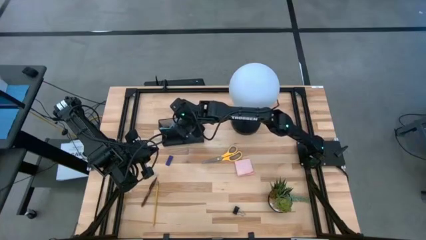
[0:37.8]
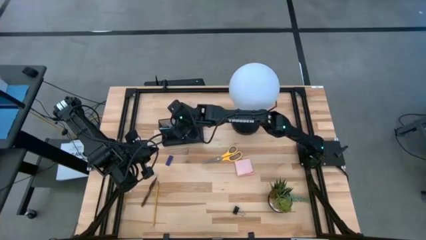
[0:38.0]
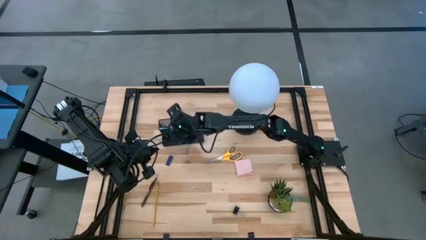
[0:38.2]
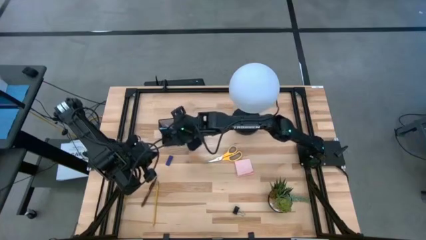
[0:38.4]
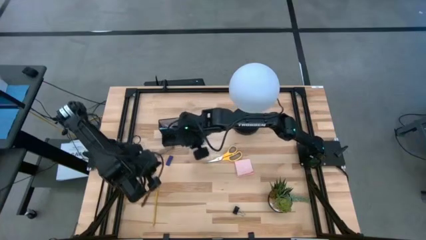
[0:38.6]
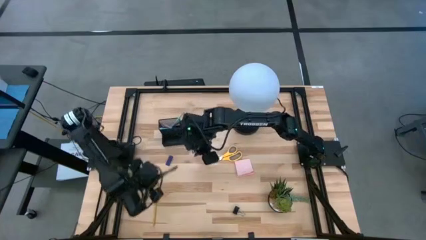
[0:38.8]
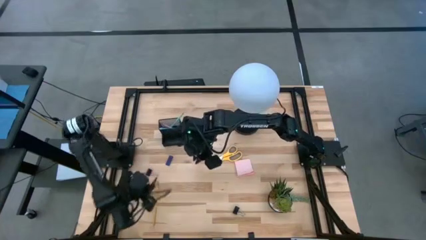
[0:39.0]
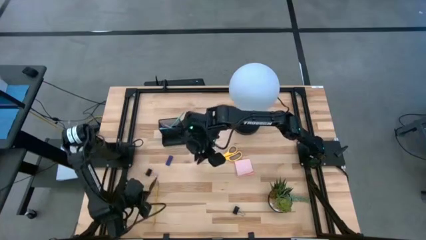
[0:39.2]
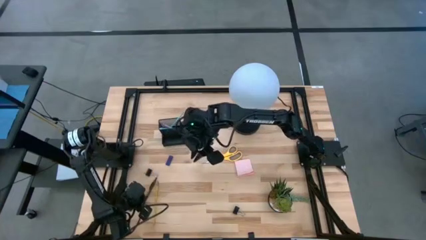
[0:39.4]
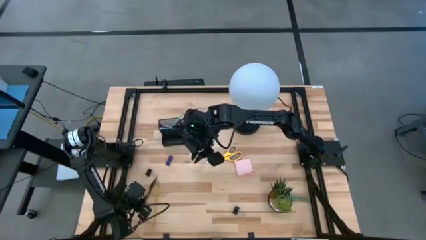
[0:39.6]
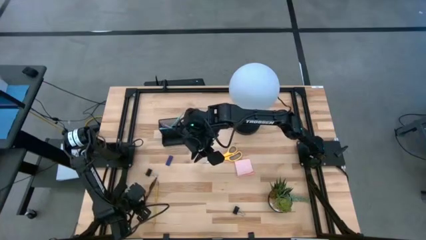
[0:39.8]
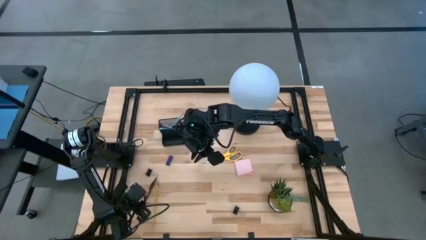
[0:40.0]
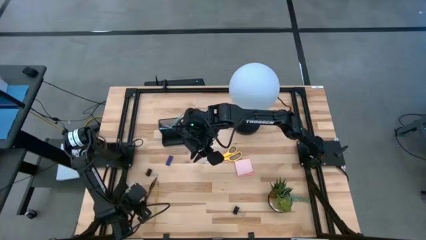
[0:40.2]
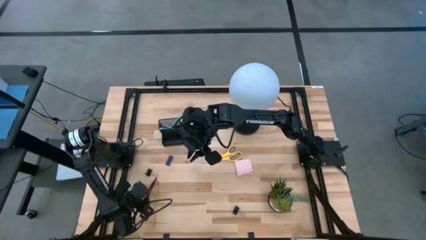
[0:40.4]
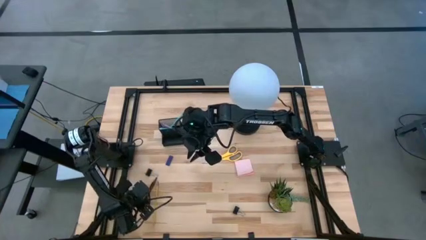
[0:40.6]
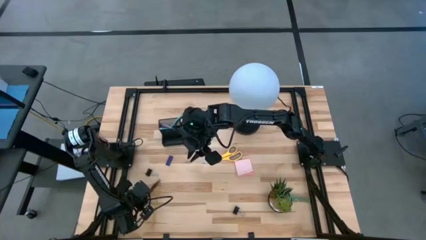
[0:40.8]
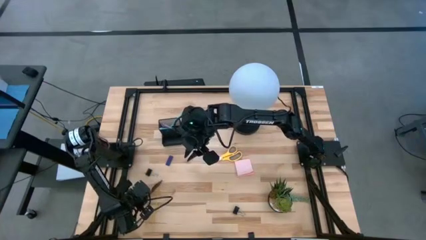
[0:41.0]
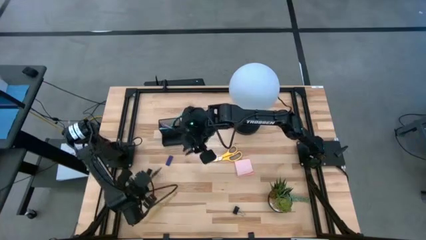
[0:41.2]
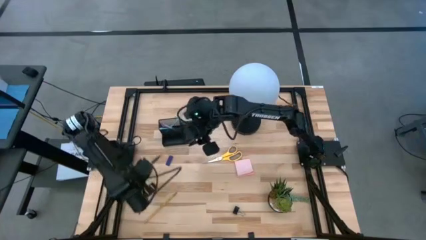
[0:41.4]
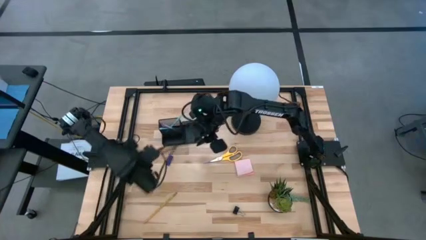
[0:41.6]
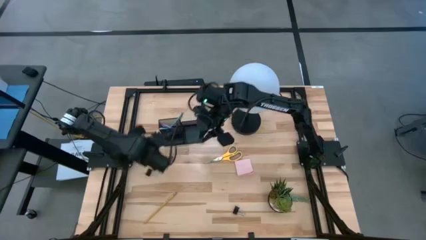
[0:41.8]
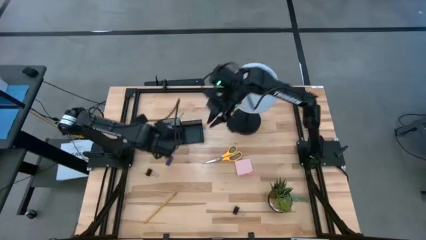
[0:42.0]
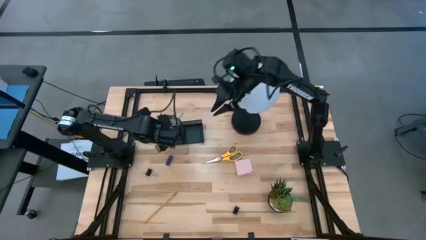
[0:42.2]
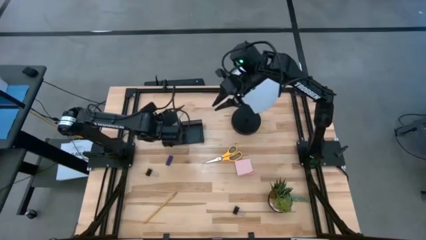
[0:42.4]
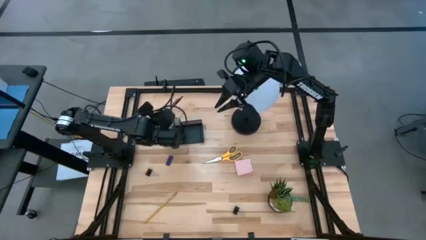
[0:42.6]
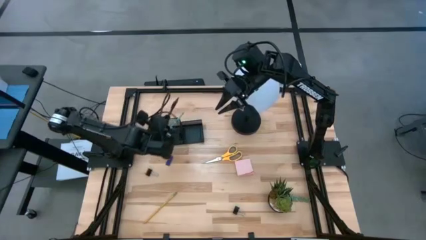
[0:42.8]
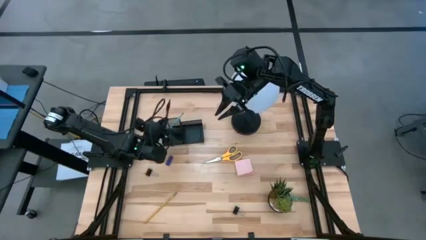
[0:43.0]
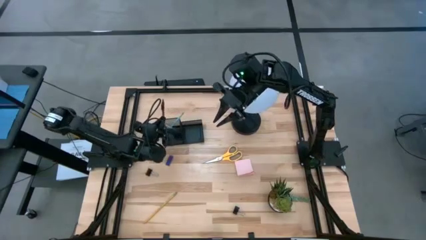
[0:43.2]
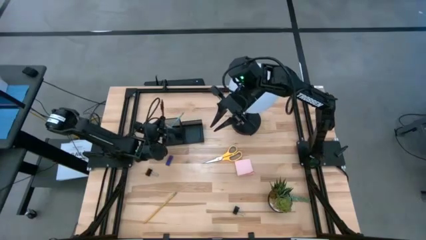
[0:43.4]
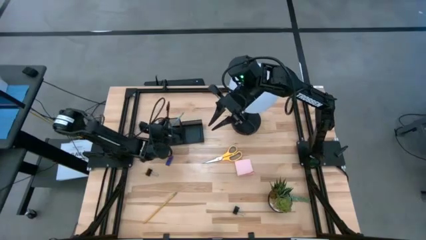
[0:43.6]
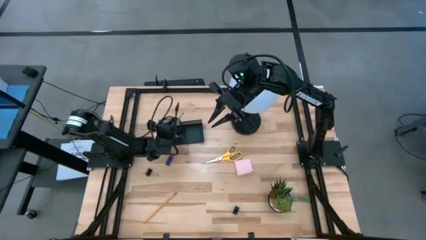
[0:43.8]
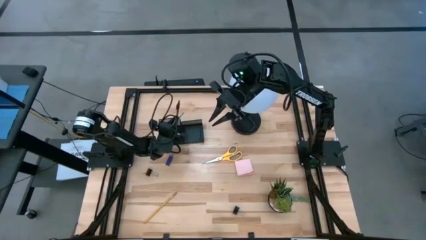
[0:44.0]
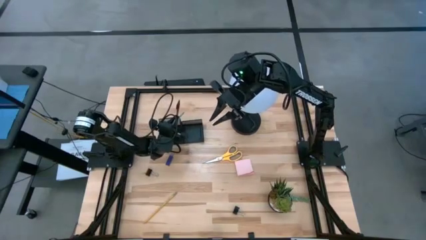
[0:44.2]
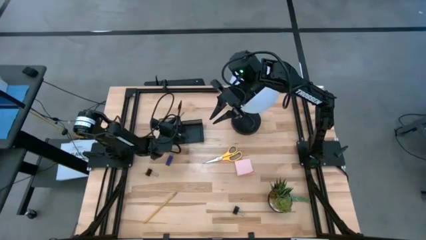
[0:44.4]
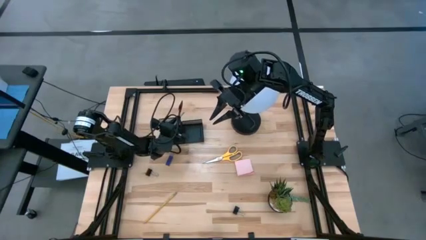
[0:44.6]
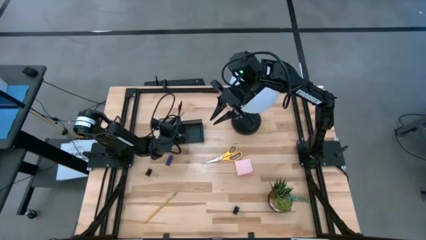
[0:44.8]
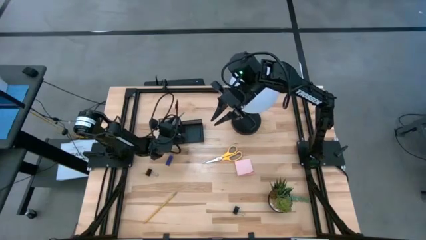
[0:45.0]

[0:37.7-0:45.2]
Task: Pick and place office supplies into organizer
Put the brown pen into the black desk organizer

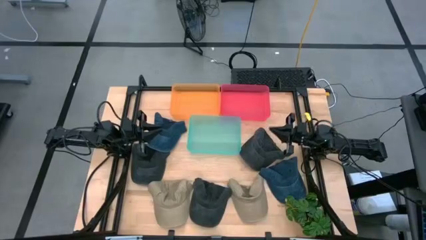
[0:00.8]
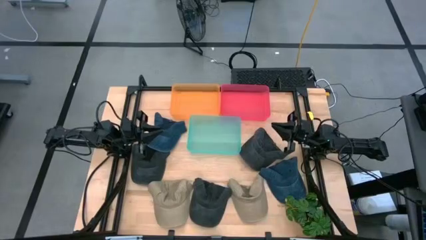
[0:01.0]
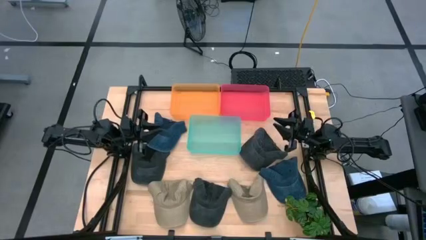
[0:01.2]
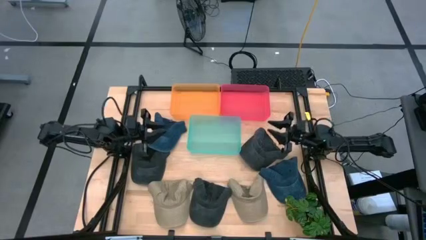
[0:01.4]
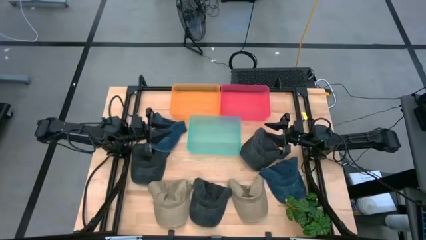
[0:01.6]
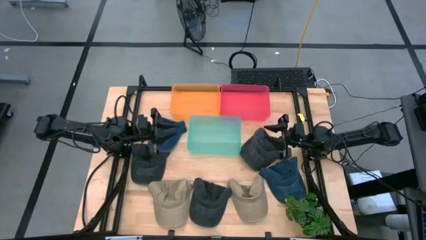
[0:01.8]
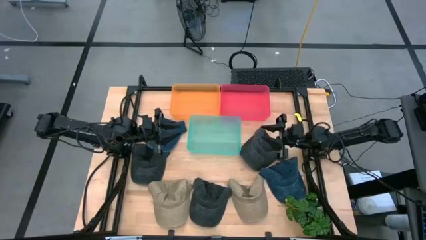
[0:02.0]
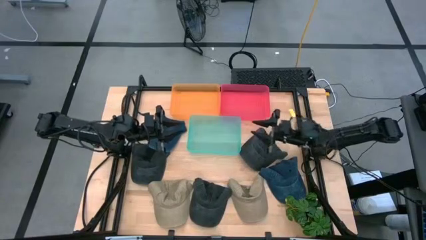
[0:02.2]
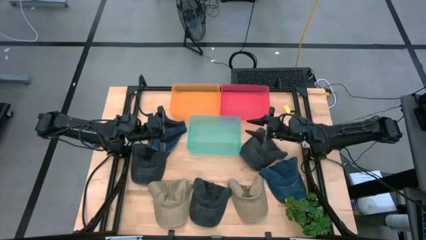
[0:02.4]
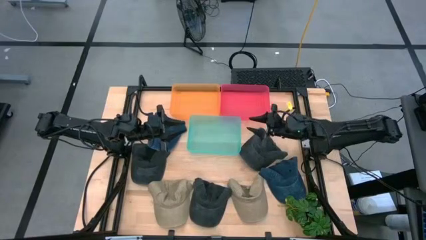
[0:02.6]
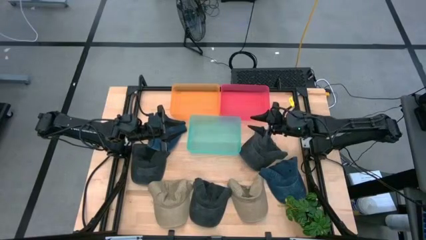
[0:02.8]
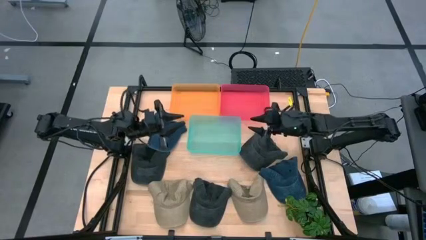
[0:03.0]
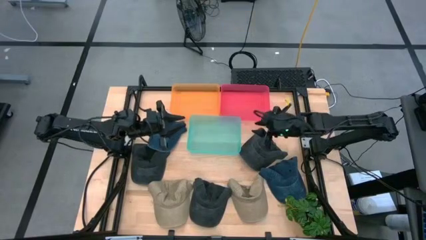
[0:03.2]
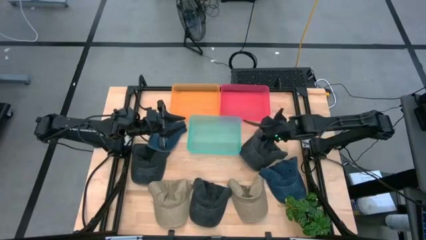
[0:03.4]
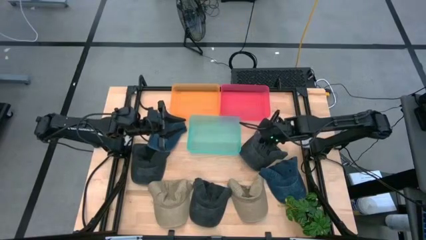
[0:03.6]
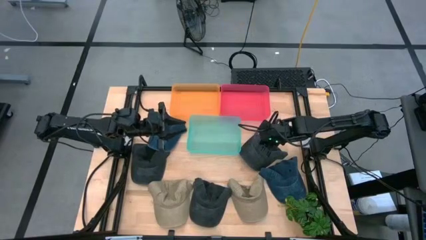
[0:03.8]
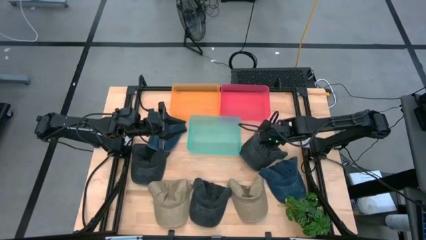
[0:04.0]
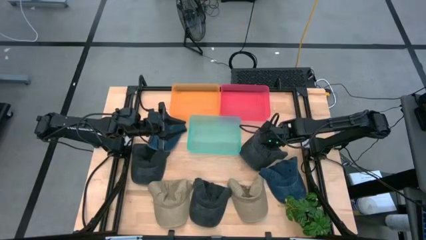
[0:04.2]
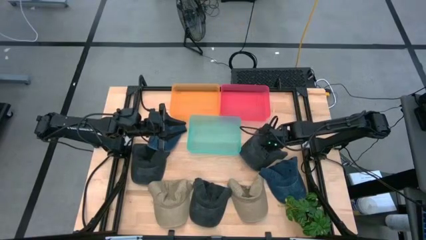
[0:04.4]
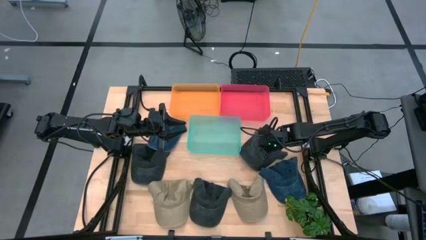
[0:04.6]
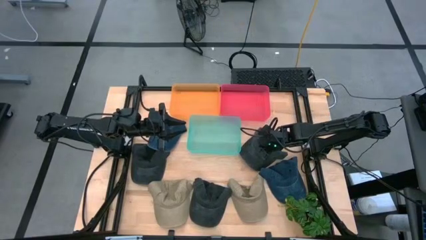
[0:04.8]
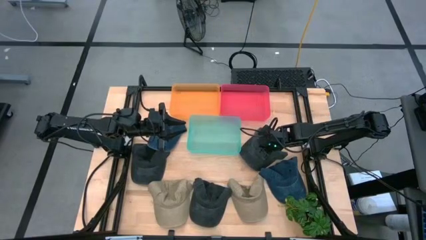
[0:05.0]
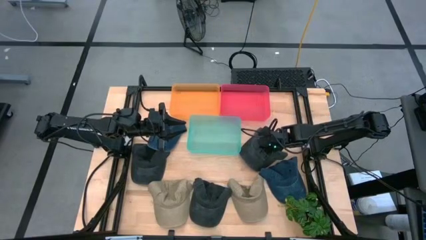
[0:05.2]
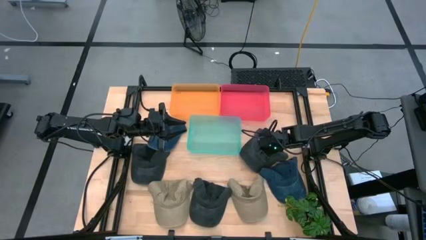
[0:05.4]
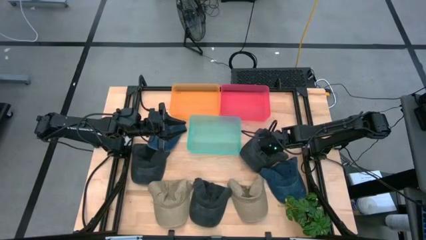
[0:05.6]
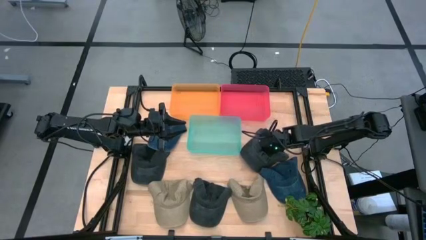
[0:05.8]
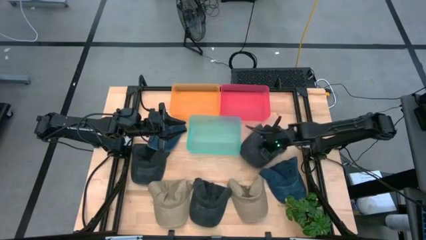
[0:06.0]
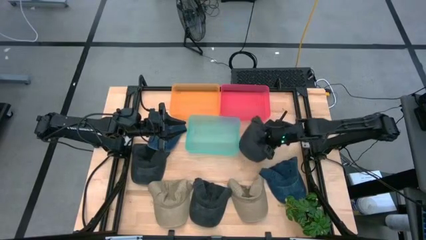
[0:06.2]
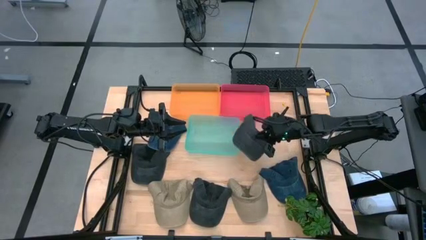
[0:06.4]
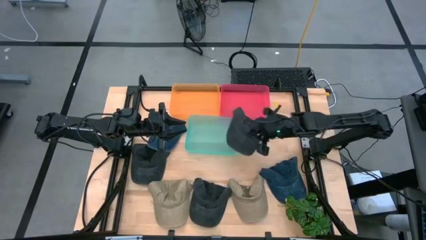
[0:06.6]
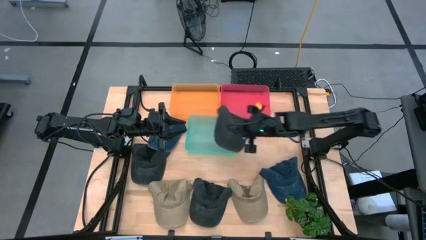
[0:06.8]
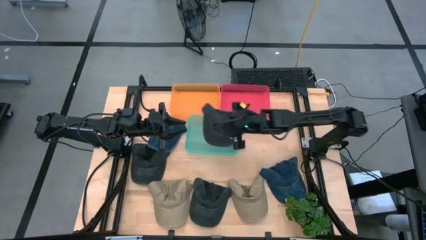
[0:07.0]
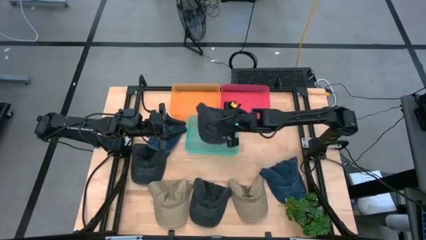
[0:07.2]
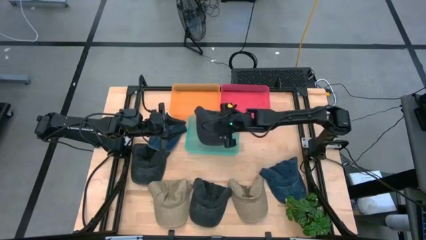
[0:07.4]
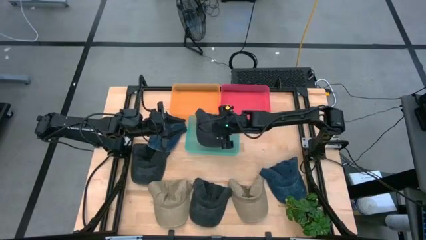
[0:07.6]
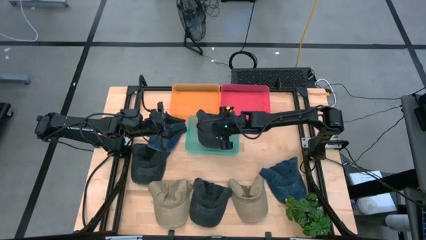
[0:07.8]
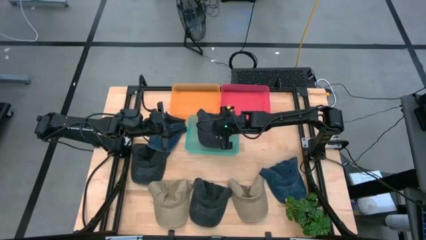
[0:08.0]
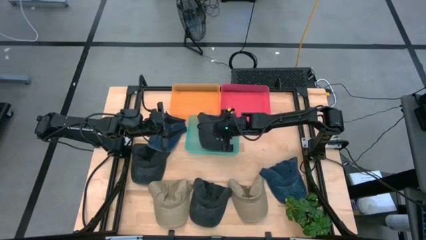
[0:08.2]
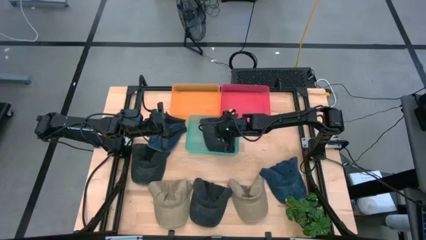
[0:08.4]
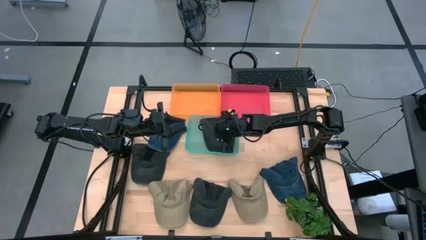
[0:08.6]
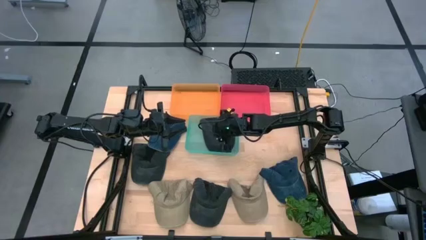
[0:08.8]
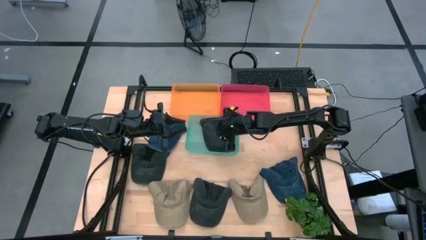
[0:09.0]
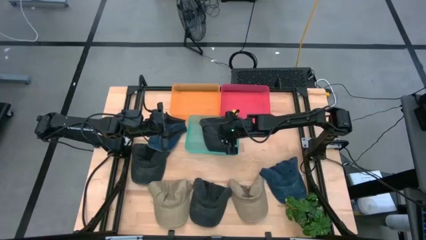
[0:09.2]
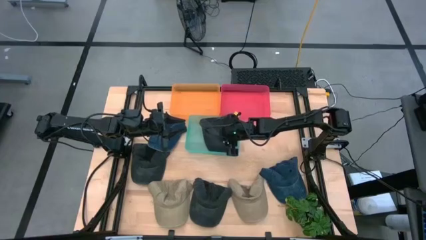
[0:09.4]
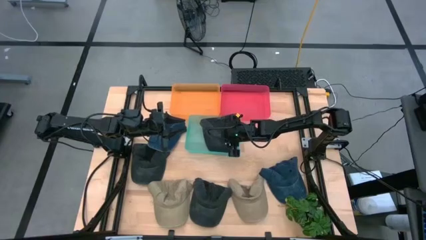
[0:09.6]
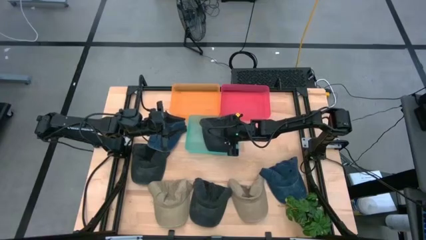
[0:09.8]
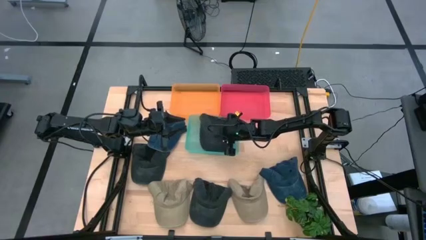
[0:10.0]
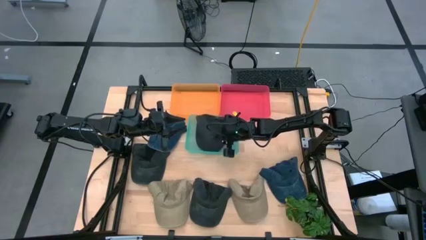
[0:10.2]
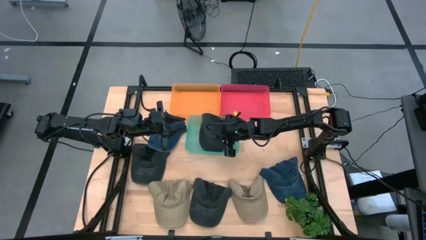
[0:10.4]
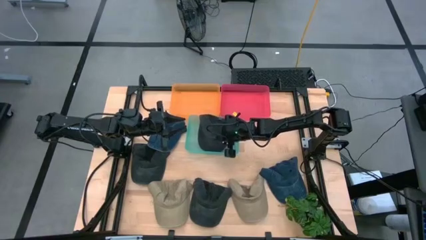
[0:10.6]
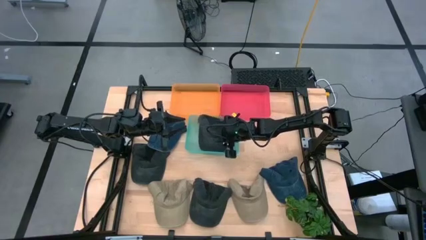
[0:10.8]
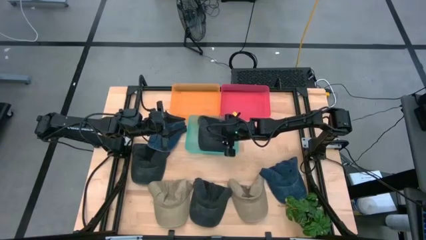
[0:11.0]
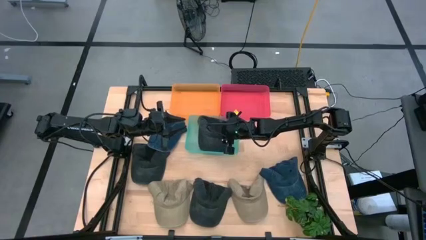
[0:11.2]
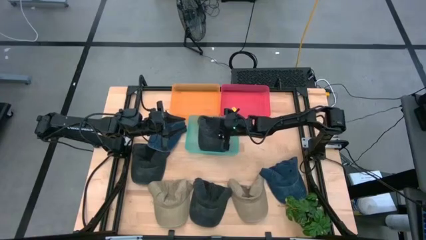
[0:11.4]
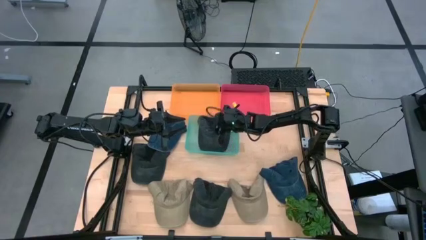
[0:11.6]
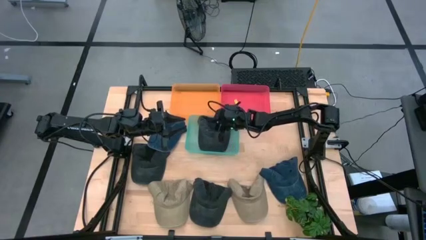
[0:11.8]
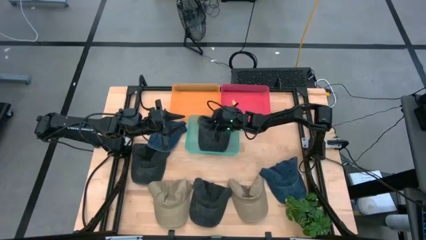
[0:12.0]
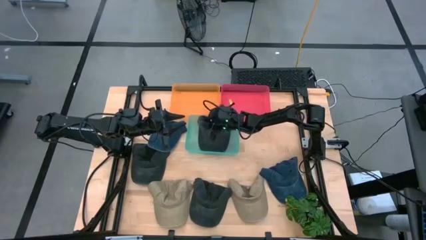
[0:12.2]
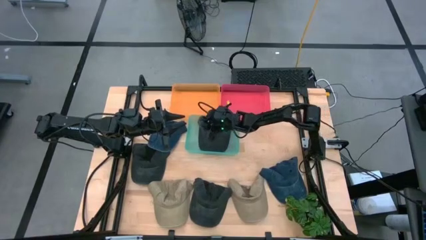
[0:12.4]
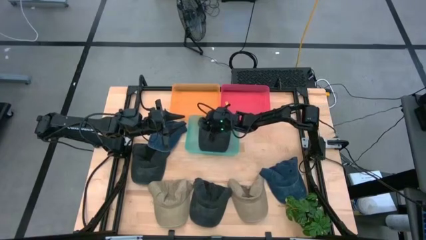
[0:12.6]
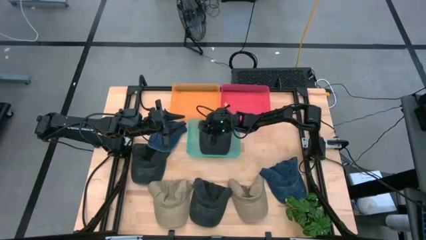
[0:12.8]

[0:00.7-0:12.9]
Task: Pick & Place hat
Put the top right black cap into the blue bin
